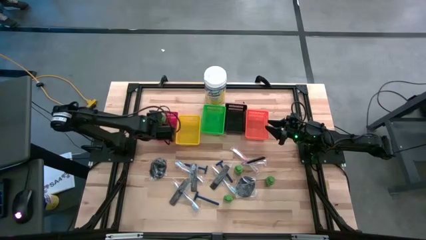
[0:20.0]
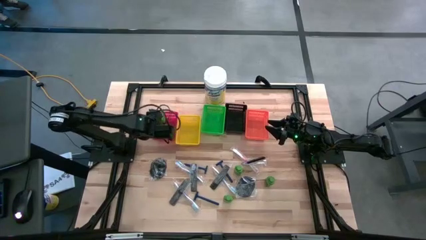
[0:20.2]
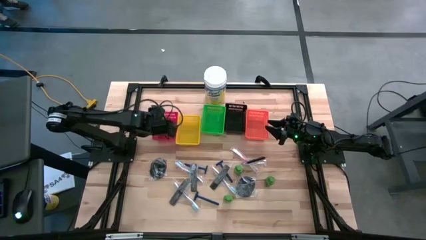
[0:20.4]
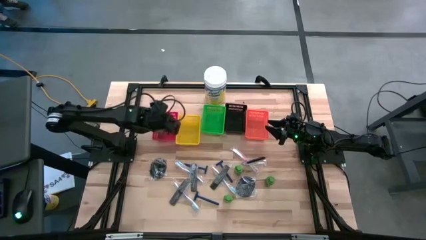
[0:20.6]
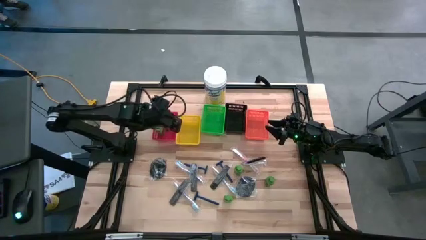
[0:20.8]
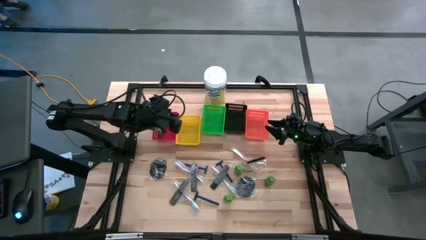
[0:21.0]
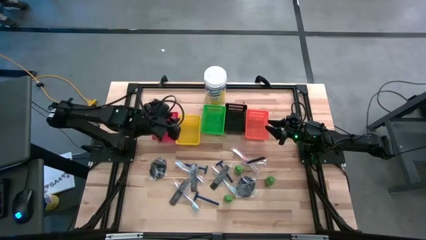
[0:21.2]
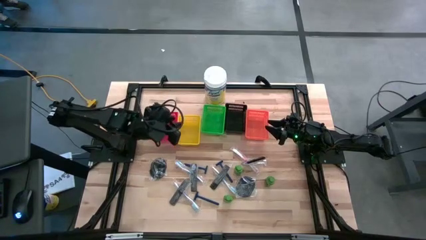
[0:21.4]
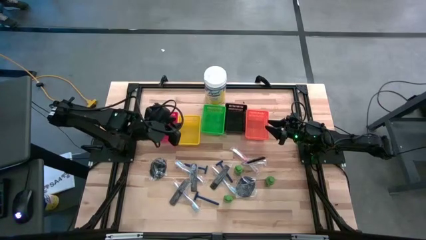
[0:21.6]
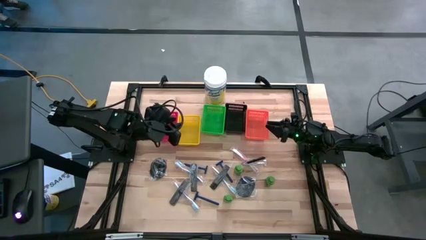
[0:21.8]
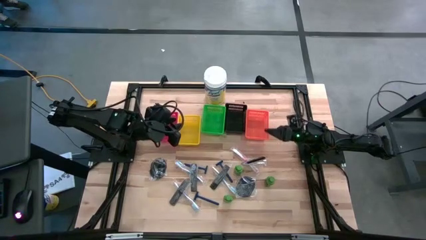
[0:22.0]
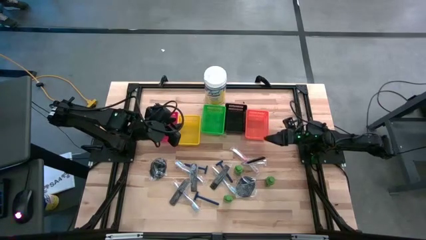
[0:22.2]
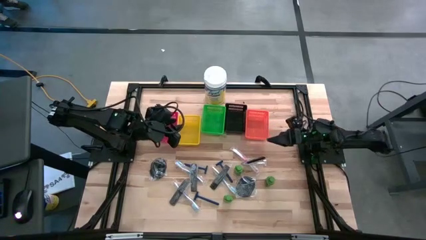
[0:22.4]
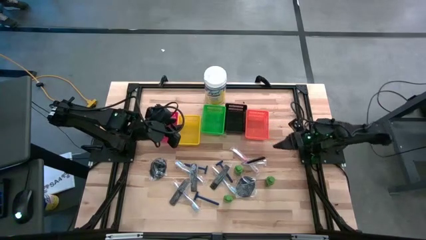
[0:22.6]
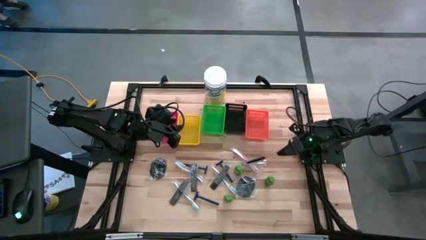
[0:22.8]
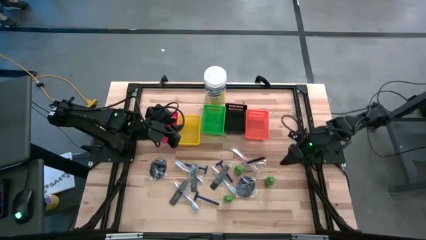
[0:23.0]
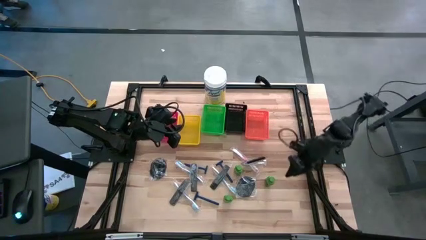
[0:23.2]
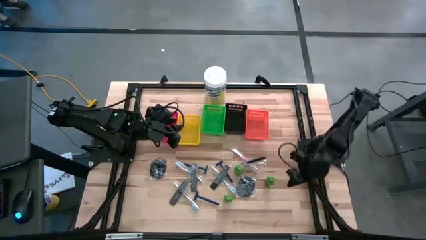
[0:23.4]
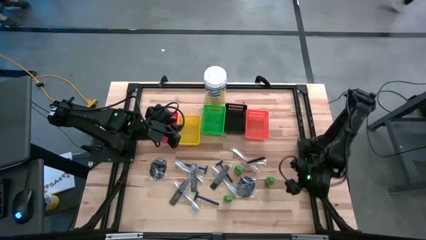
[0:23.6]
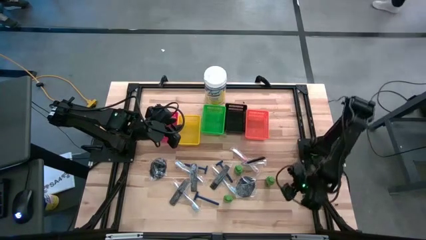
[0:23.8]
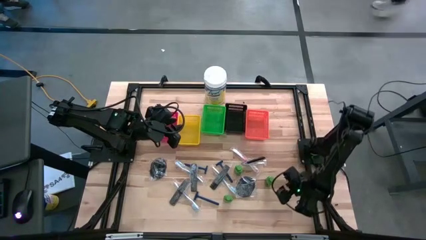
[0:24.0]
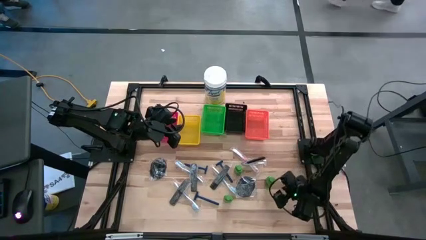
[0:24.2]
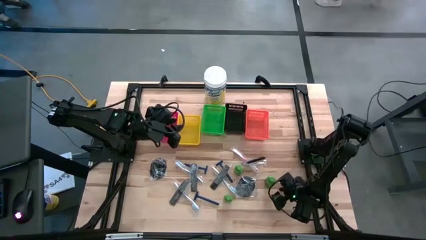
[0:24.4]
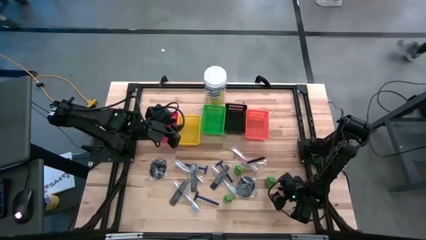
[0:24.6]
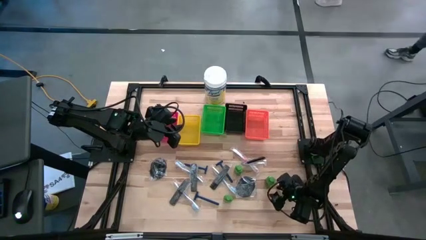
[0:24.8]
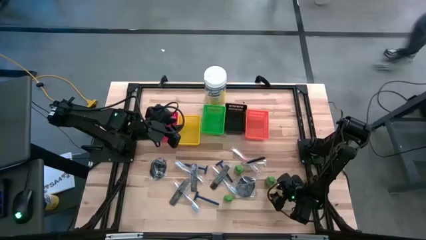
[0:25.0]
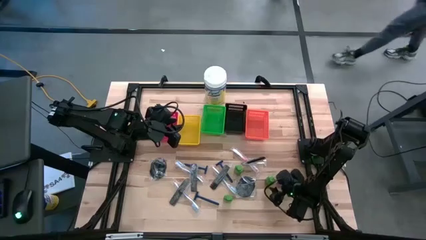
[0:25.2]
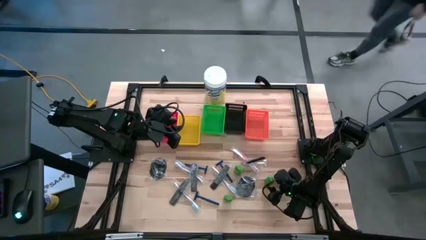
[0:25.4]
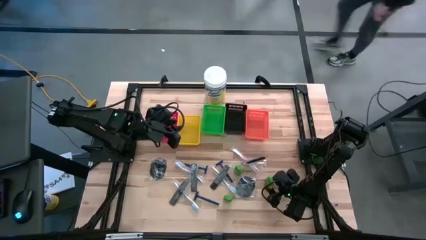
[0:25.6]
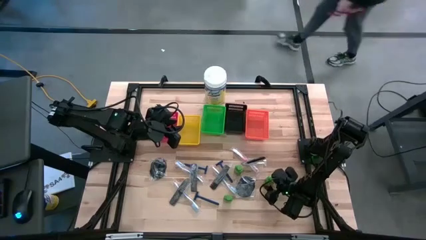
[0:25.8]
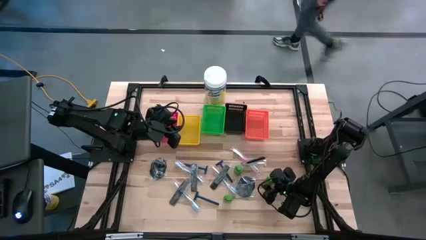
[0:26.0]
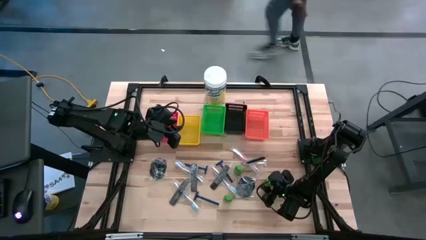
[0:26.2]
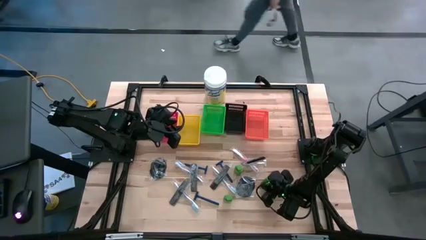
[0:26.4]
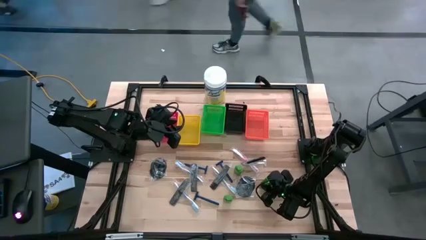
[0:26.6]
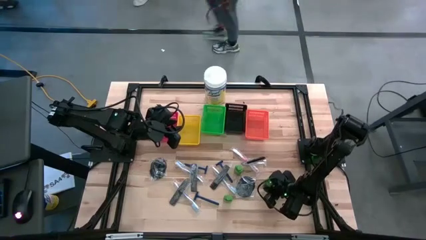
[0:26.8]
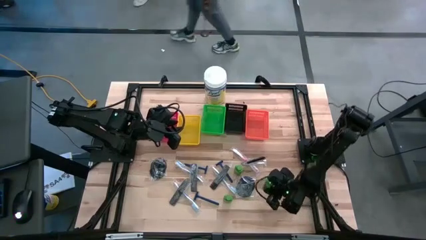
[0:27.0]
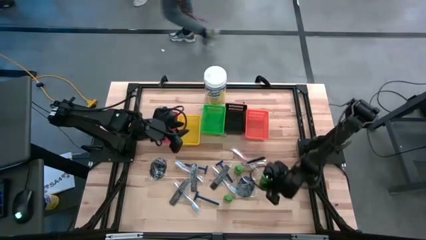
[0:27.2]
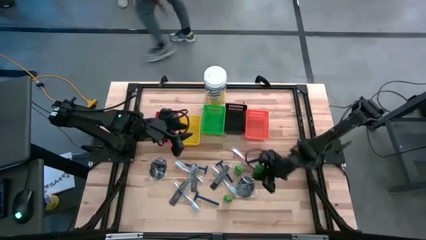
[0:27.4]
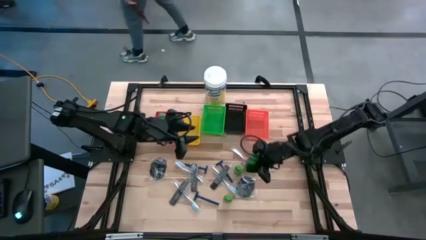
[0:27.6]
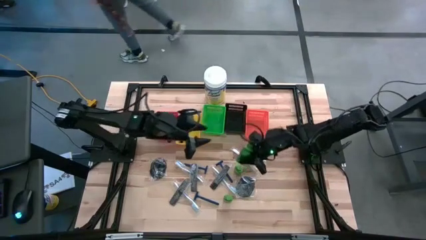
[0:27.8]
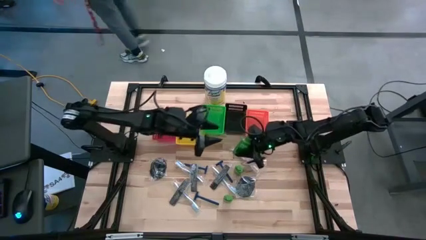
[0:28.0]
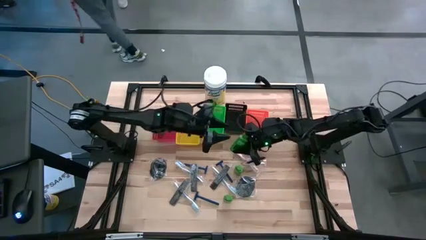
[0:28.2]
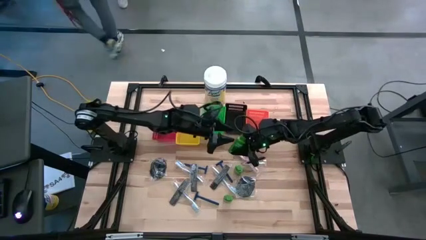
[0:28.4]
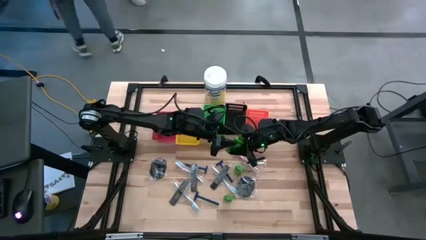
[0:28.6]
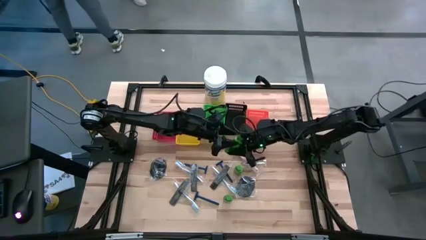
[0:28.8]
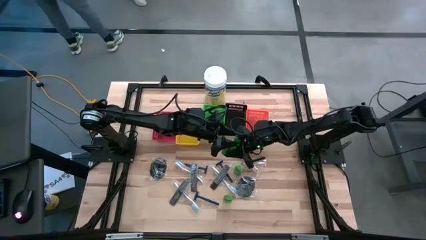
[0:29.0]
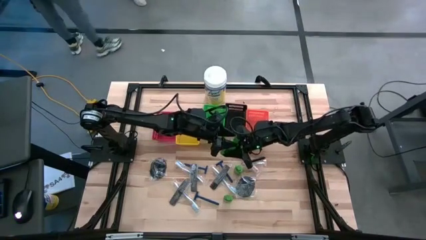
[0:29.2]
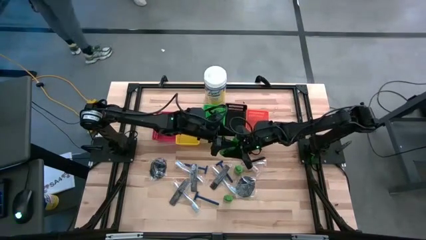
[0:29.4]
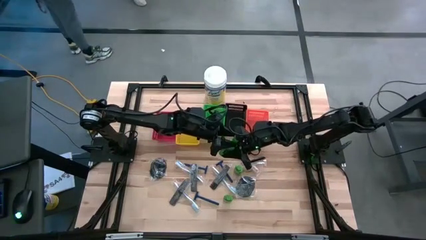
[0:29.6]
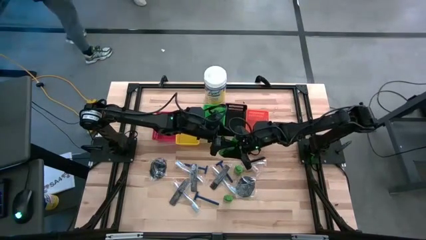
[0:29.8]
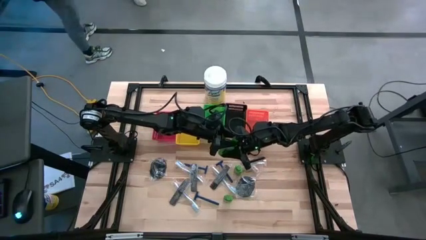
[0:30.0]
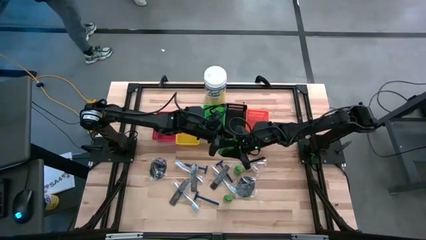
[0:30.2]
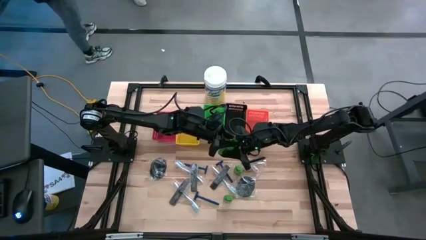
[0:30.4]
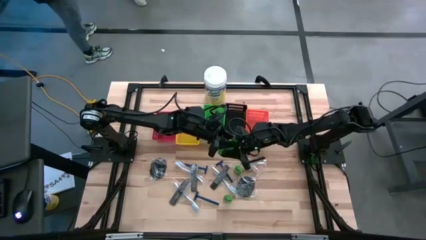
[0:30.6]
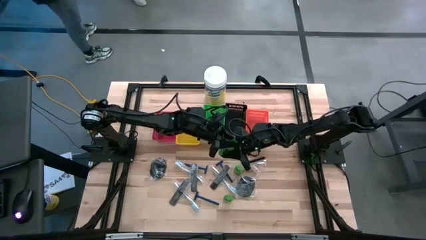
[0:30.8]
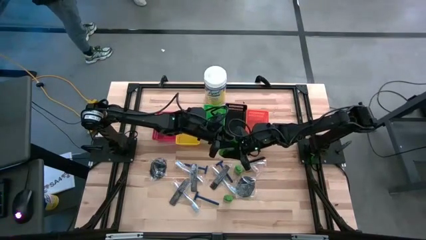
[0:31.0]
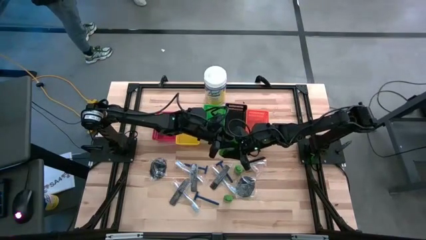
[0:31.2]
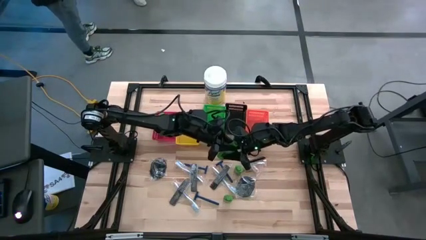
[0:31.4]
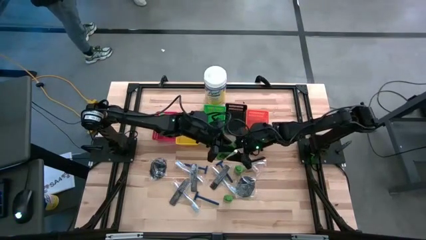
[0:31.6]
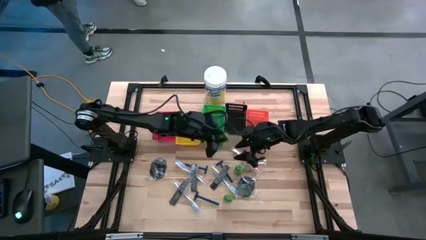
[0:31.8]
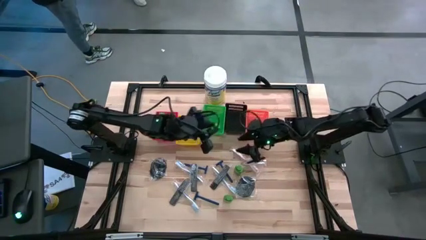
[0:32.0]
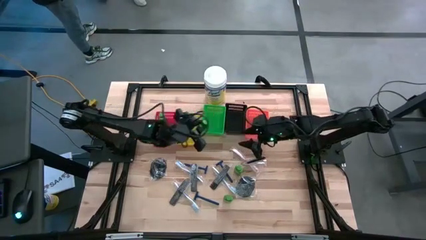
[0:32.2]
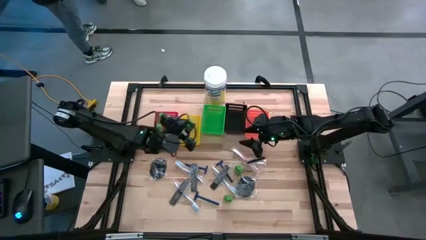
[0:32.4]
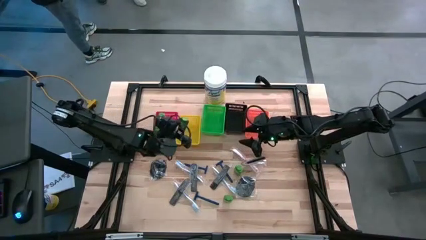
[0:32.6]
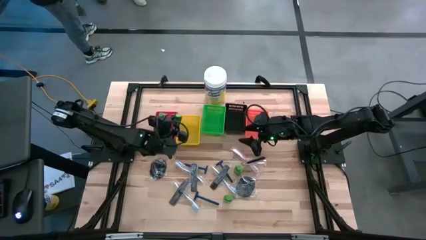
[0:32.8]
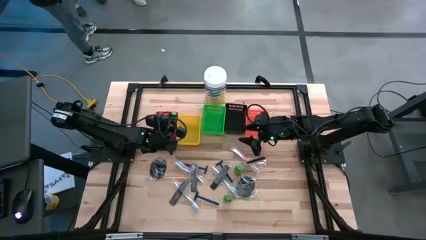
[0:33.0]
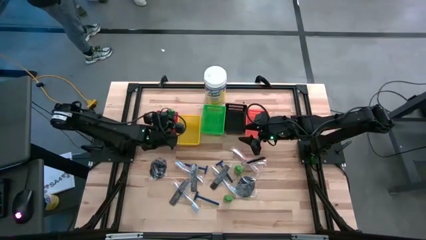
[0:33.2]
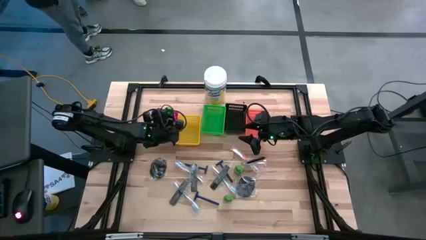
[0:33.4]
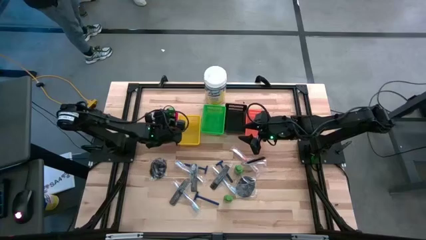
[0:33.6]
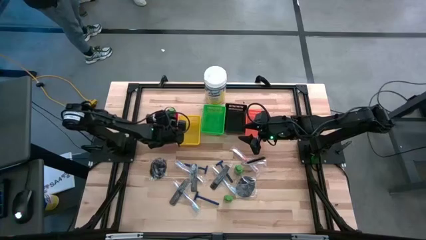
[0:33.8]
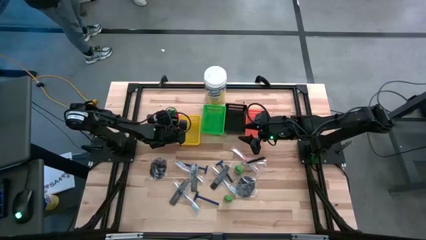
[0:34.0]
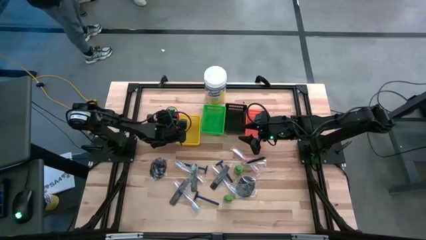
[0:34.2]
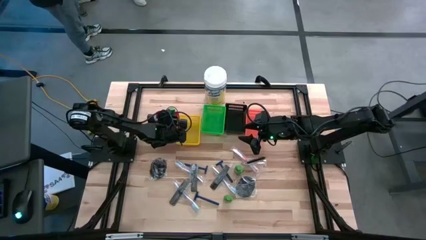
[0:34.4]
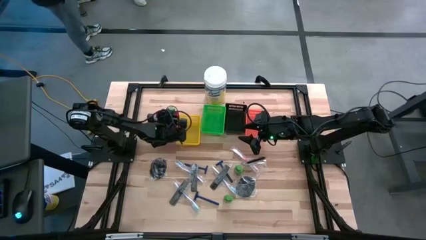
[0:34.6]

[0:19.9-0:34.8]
Task: Pick & Place Travel size toiletries
Put the green shampoo bottle into the red bin
